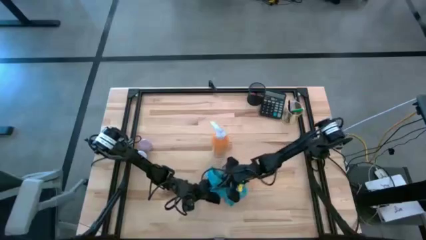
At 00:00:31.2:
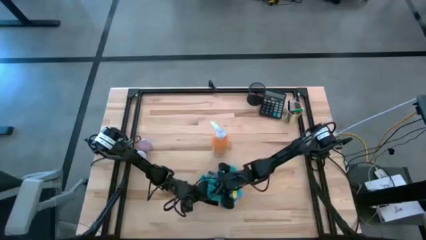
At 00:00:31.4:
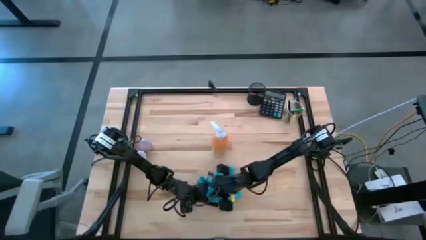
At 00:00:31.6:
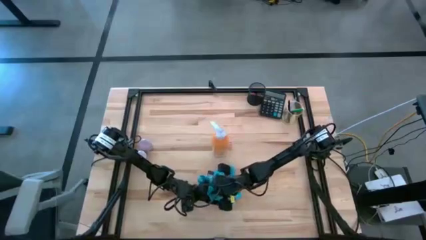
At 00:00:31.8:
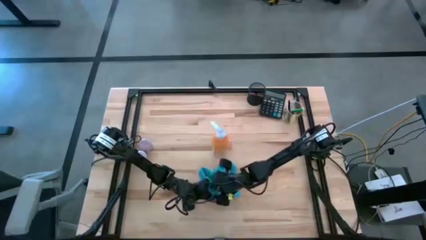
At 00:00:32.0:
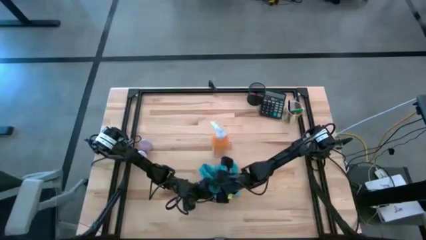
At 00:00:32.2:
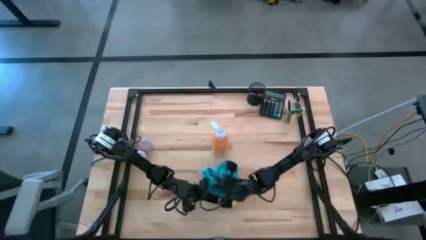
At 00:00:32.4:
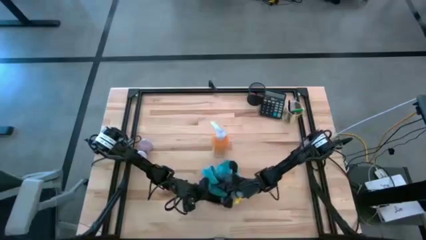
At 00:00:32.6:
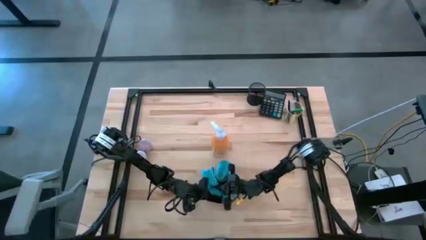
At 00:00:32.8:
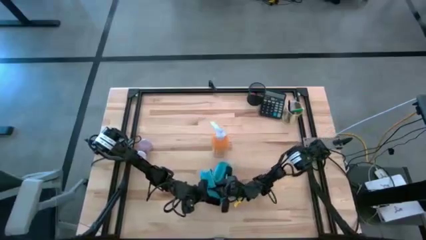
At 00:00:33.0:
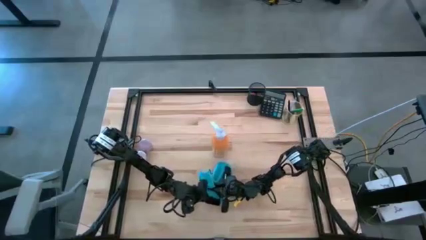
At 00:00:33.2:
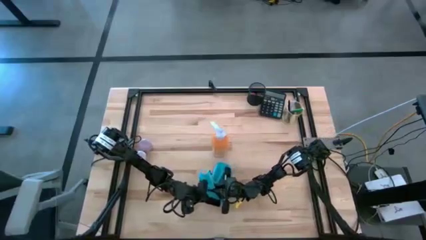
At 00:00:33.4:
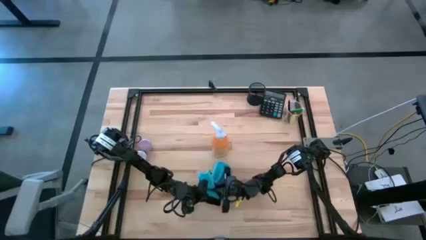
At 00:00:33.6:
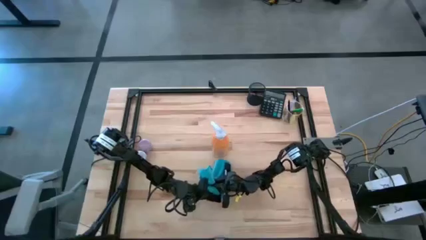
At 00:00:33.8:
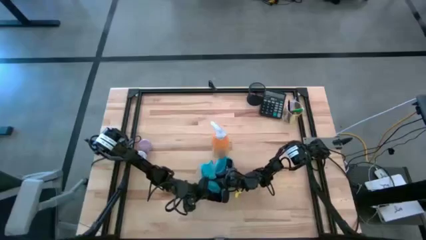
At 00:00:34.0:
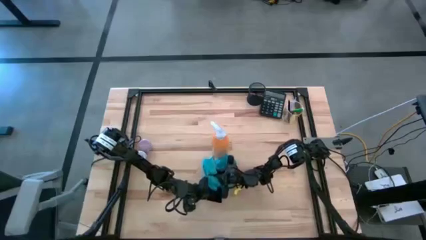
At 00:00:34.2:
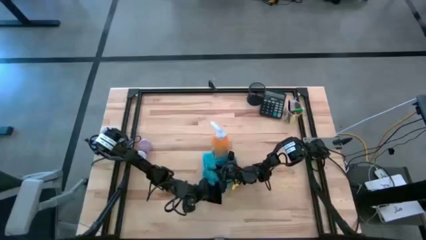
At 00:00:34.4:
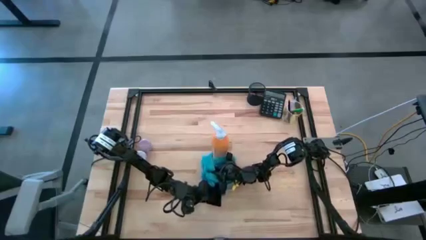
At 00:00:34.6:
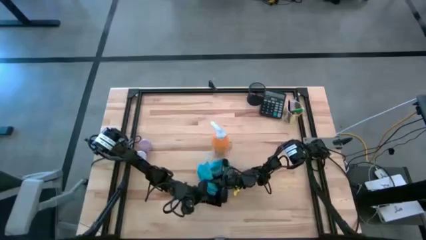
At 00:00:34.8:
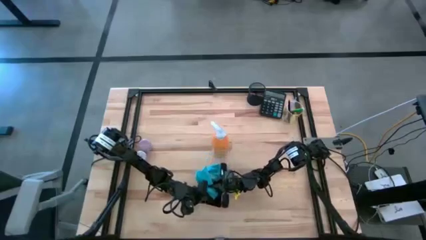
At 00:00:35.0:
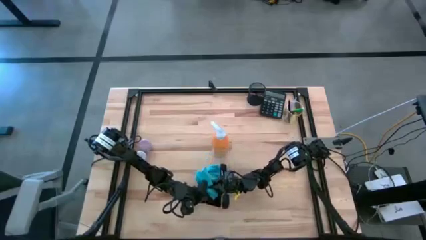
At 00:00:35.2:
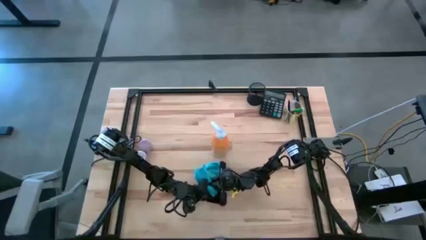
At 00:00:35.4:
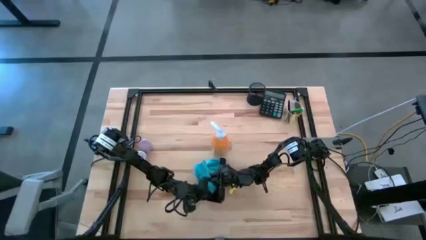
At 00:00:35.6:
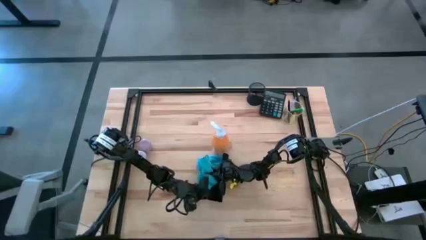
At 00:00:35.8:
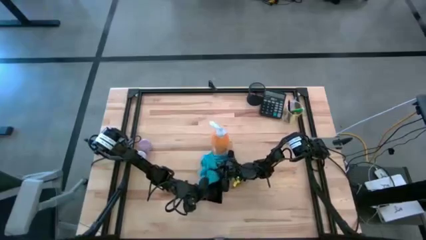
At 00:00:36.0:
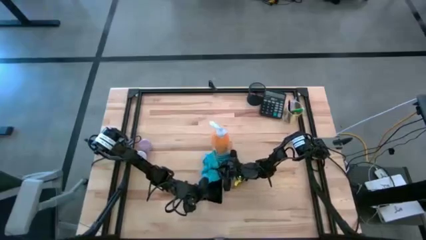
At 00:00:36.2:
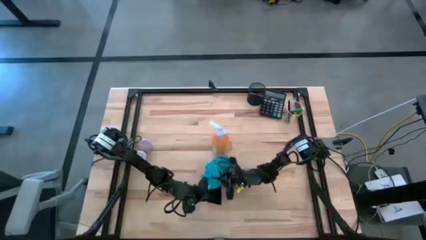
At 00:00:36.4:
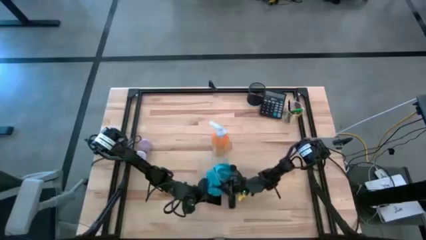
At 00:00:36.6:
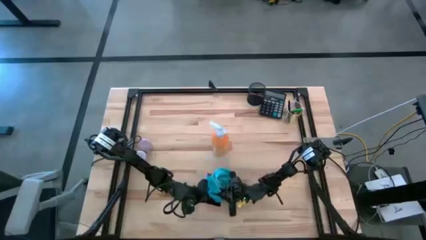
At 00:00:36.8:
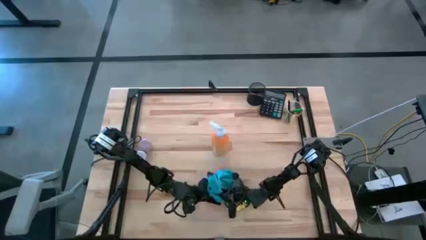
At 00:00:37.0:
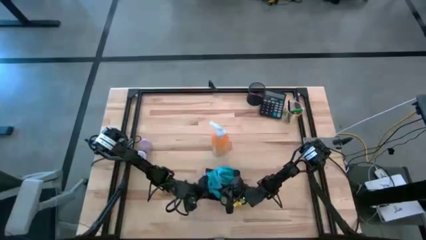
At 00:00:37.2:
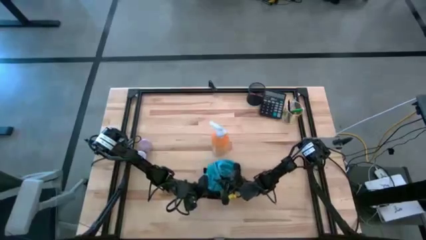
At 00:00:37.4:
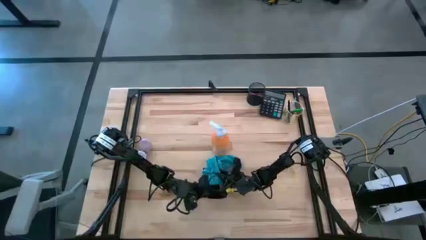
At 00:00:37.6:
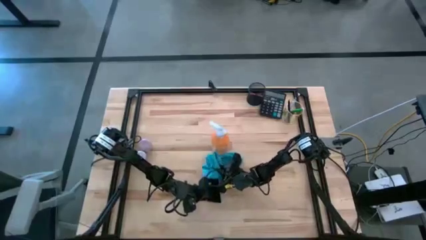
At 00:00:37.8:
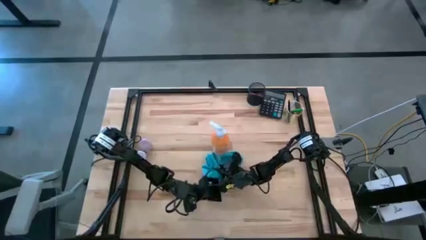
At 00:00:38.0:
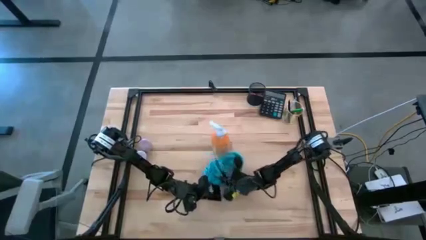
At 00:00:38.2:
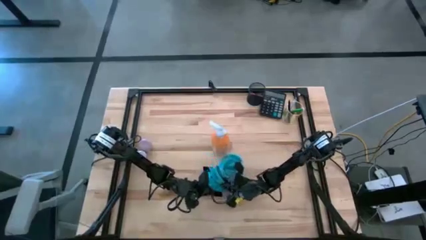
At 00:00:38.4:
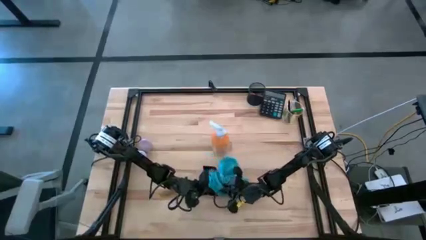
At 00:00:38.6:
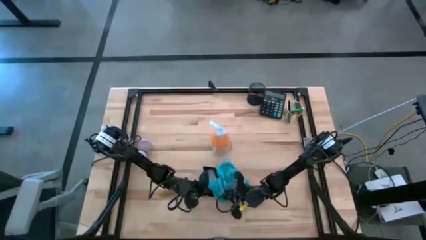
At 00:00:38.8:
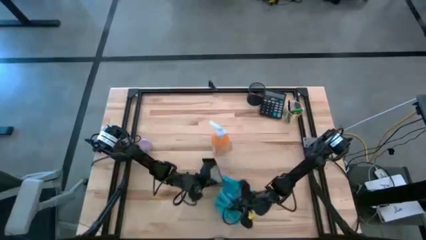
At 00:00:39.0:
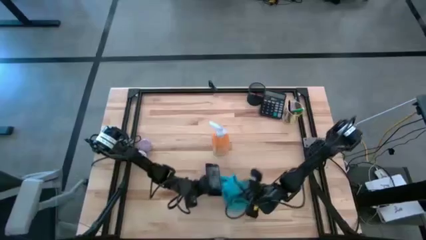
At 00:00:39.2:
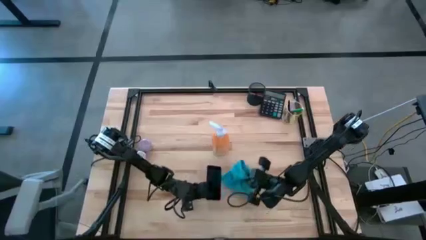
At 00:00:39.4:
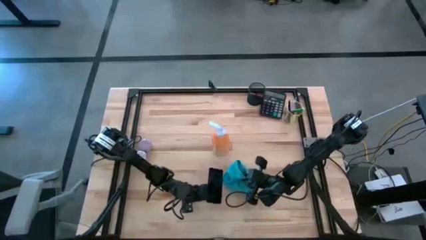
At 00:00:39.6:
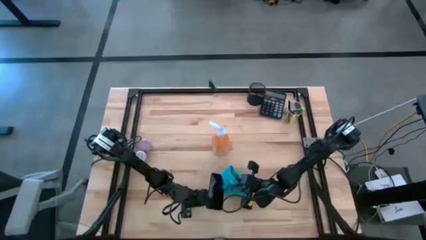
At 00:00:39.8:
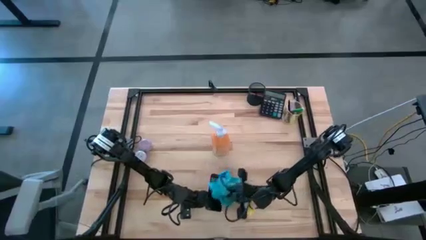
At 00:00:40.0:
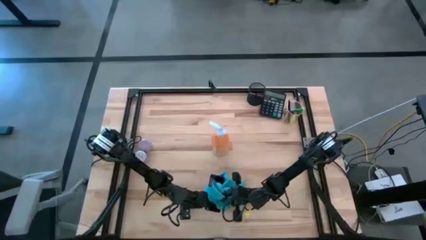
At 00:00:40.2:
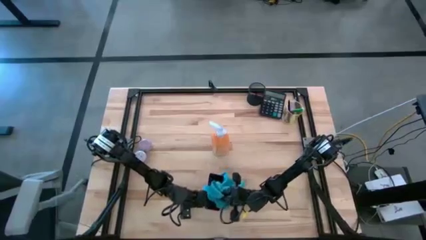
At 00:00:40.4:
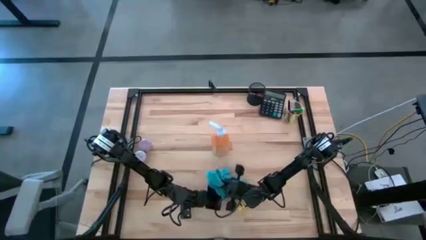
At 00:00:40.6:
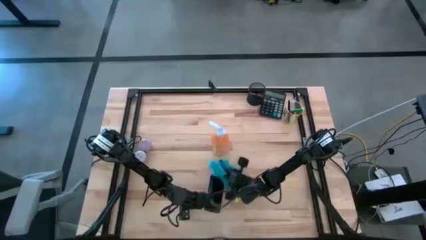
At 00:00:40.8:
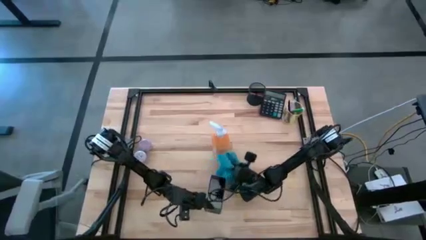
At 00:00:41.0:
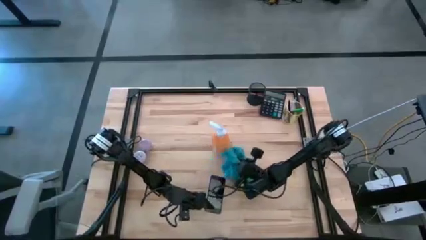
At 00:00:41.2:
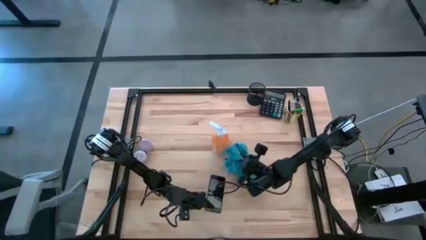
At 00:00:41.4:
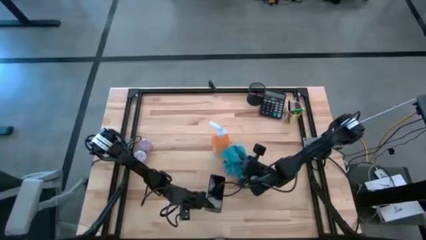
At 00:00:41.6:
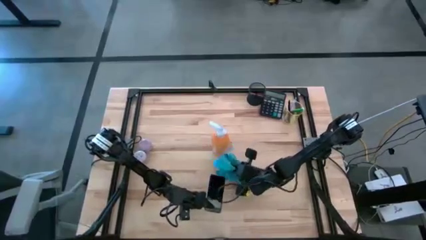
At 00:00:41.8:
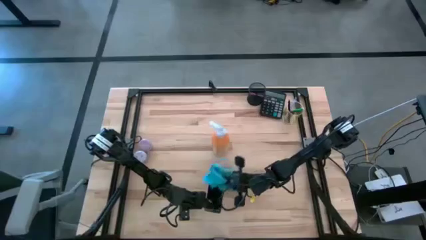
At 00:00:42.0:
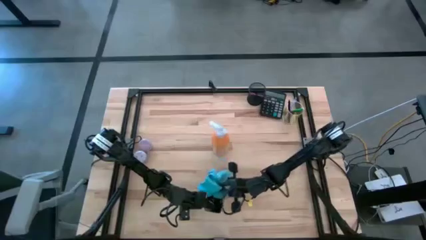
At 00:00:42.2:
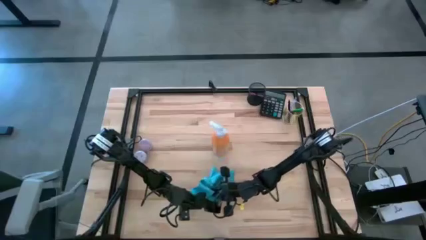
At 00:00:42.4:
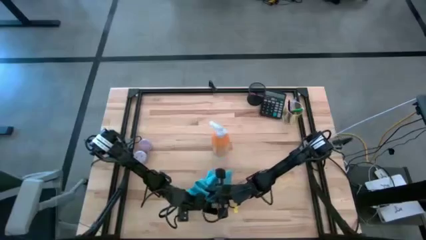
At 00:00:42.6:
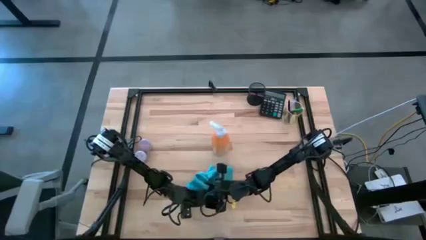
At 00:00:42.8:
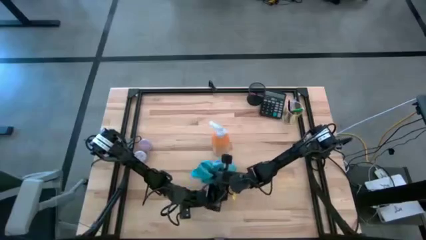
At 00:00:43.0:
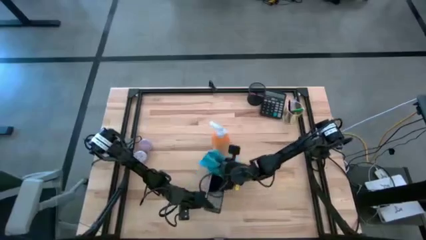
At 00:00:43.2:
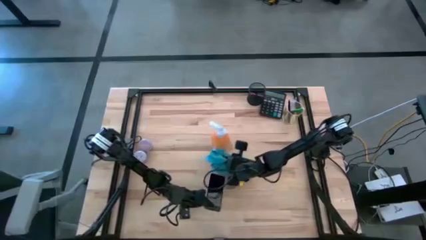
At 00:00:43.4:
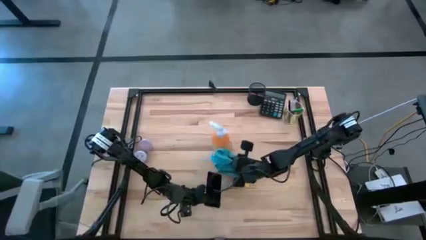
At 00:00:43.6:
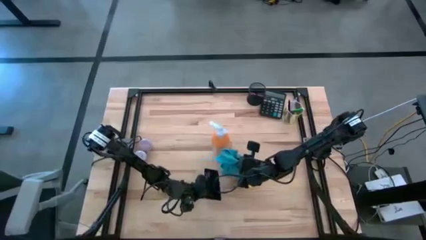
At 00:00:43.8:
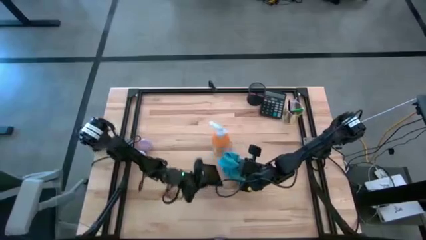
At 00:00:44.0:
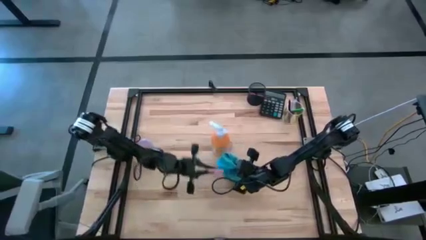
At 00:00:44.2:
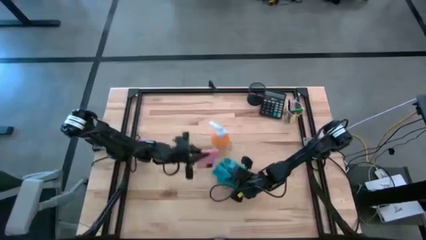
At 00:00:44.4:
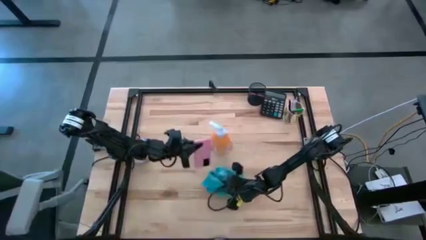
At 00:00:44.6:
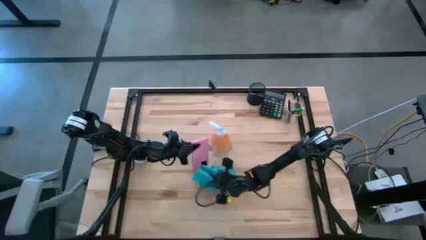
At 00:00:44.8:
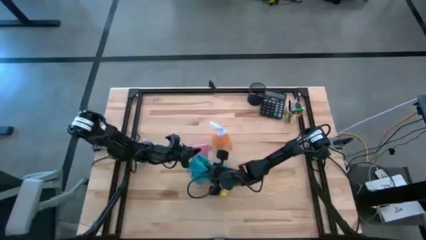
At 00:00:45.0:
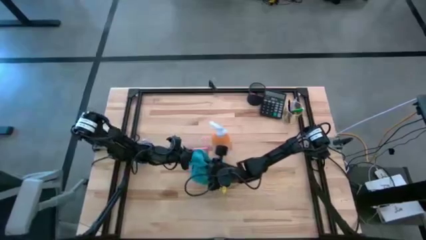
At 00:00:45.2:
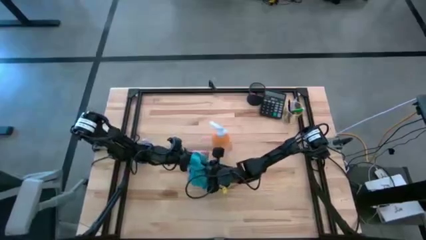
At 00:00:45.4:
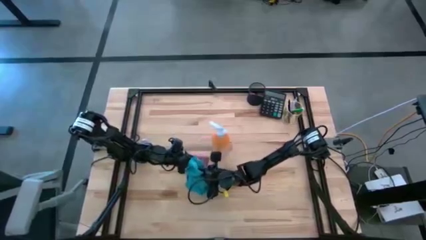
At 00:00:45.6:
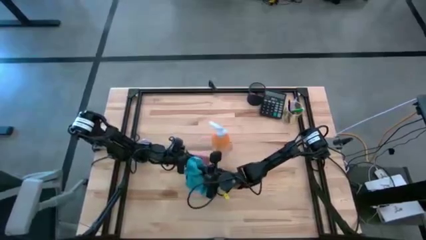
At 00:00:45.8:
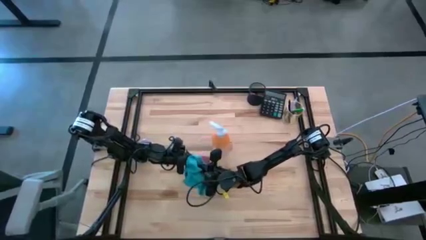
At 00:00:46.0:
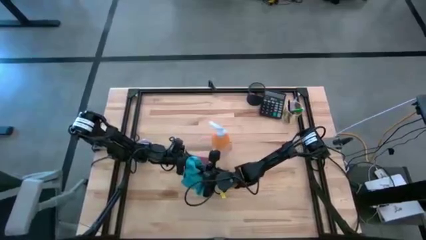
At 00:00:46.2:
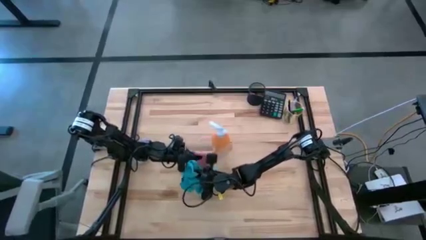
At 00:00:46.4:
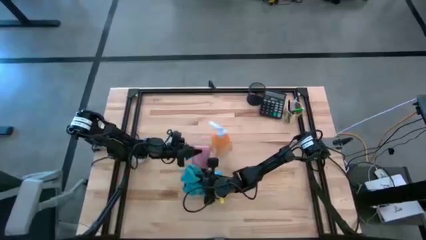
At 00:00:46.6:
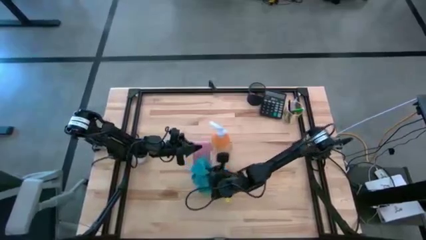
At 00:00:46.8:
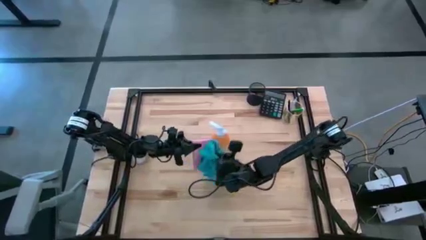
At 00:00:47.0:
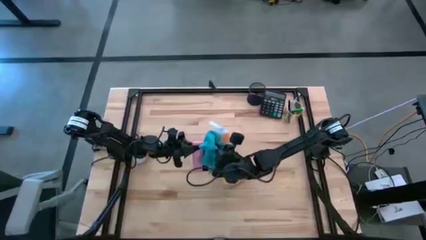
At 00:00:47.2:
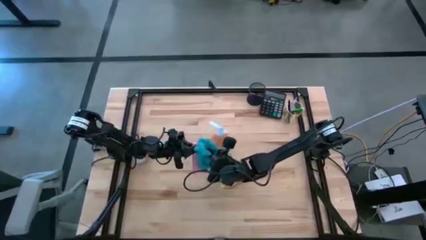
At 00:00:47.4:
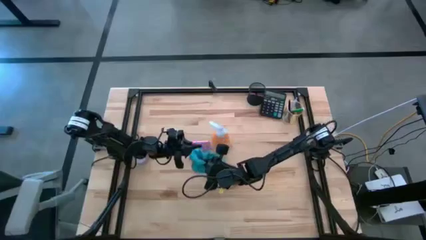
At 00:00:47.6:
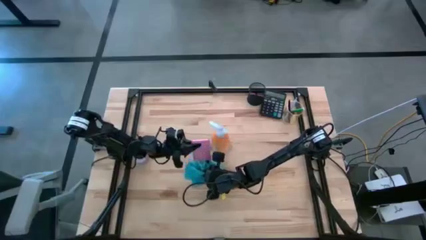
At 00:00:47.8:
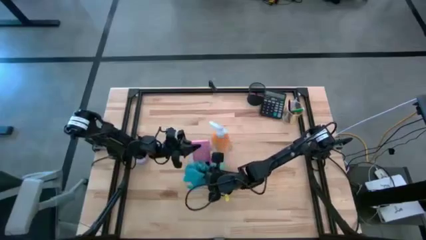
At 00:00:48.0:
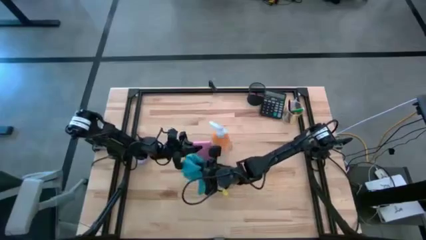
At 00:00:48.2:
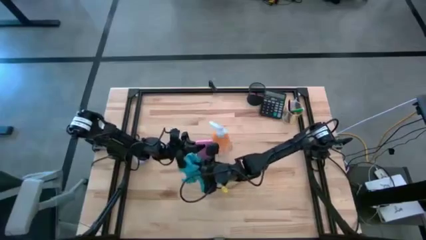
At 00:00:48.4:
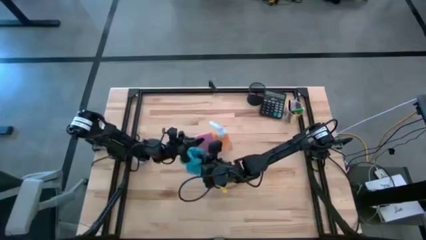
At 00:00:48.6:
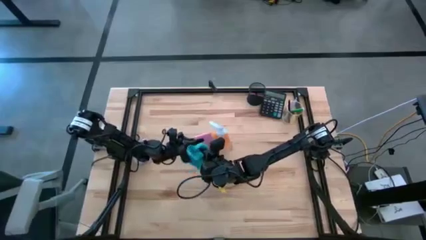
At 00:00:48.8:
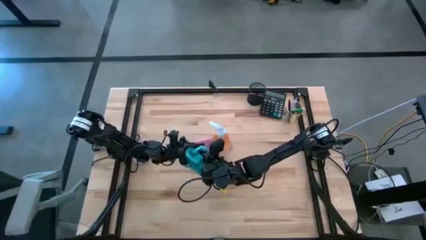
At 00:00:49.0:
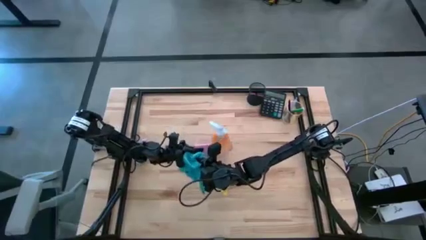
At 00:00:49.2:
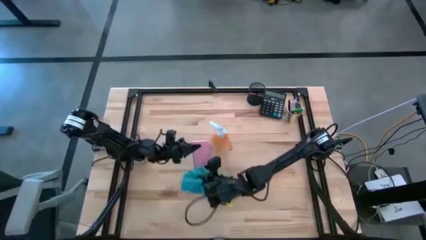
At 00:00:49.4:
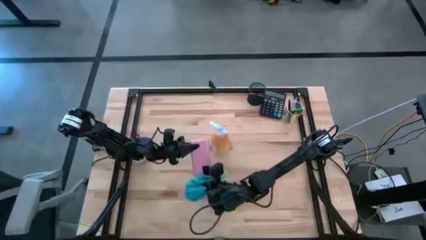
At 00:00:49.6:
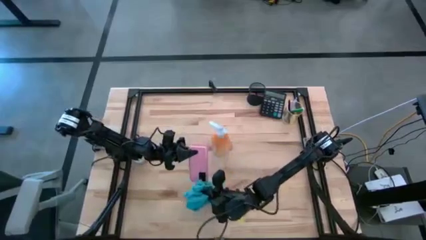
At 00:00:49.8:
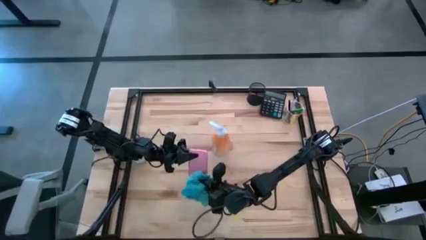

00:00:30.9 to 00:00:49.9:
Task: Apply microfiber cloth
Wipe the cellphone with the microfiber cloth
